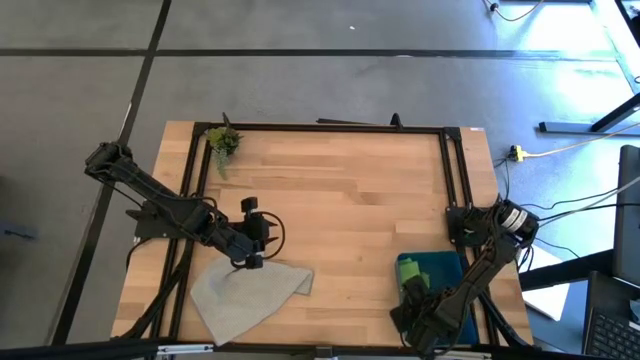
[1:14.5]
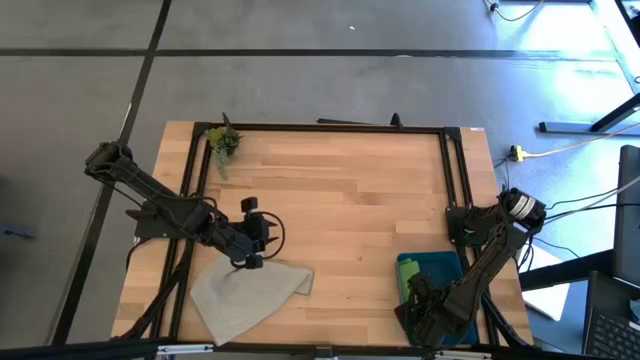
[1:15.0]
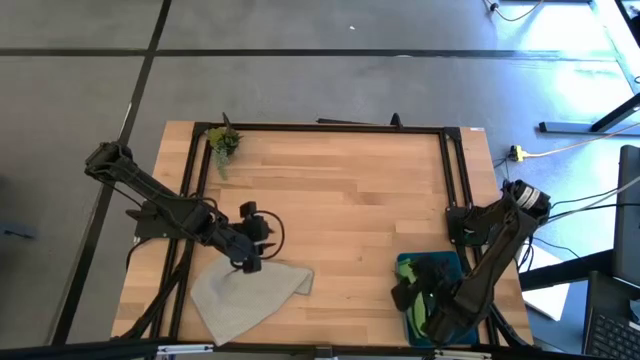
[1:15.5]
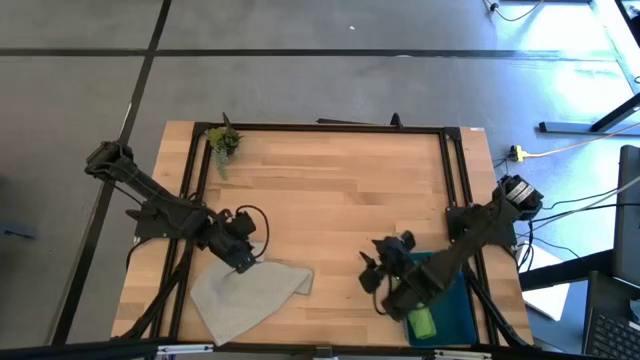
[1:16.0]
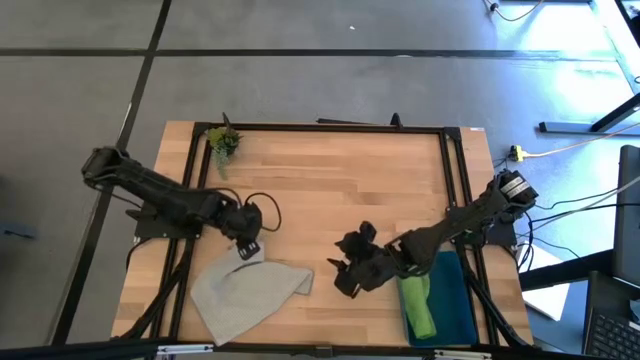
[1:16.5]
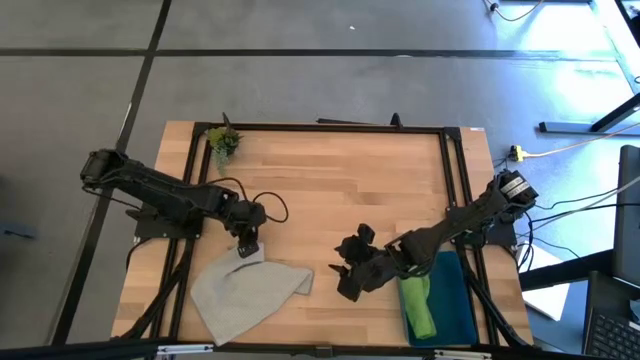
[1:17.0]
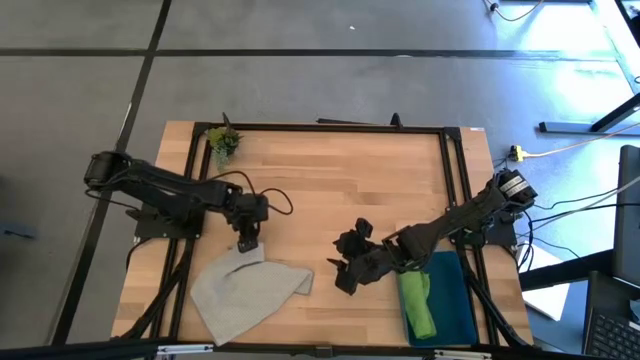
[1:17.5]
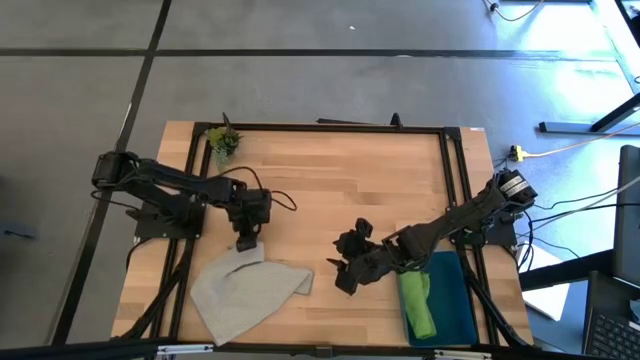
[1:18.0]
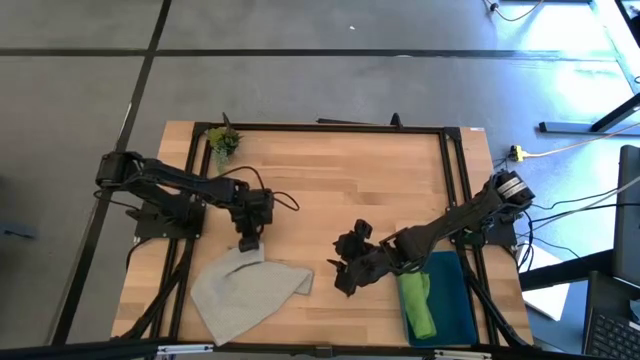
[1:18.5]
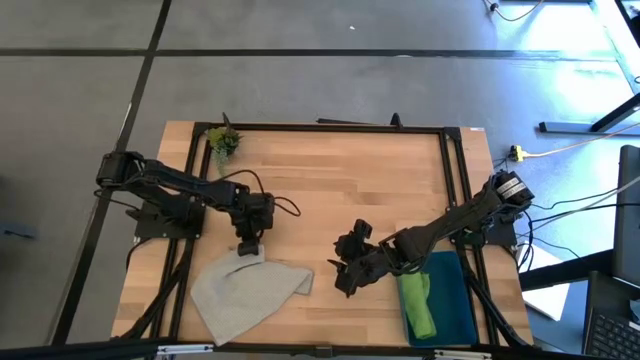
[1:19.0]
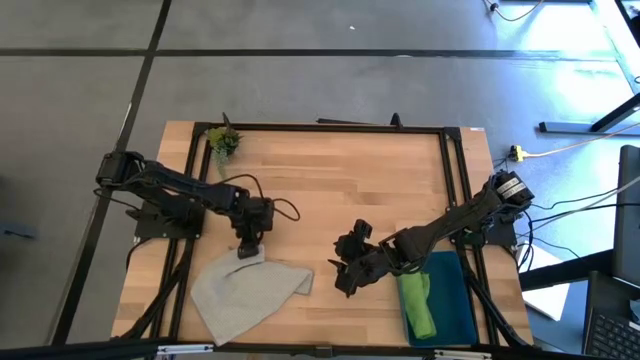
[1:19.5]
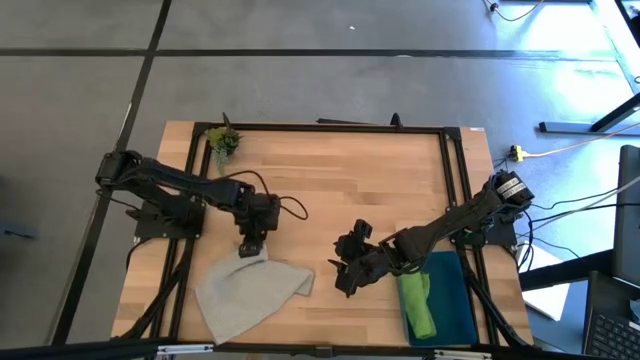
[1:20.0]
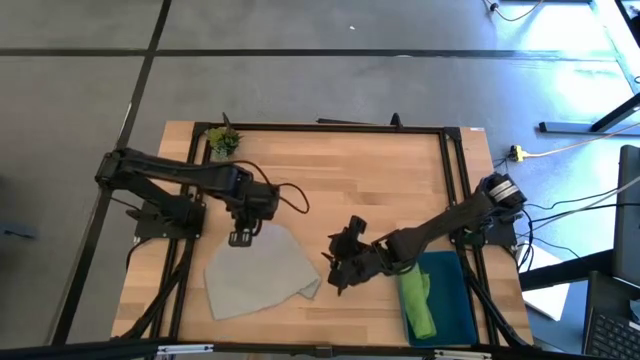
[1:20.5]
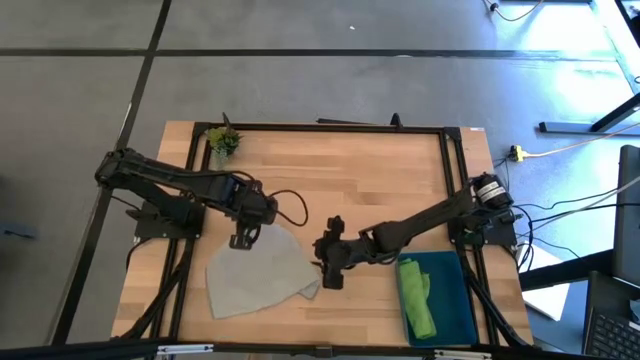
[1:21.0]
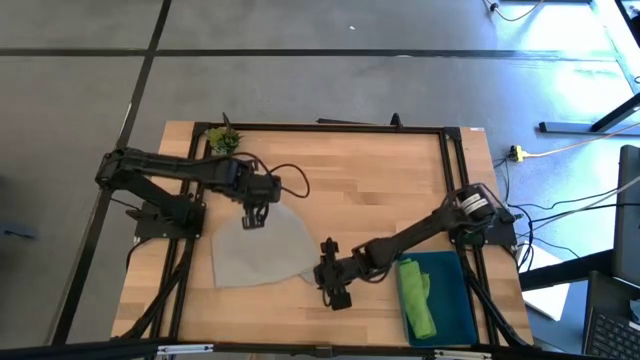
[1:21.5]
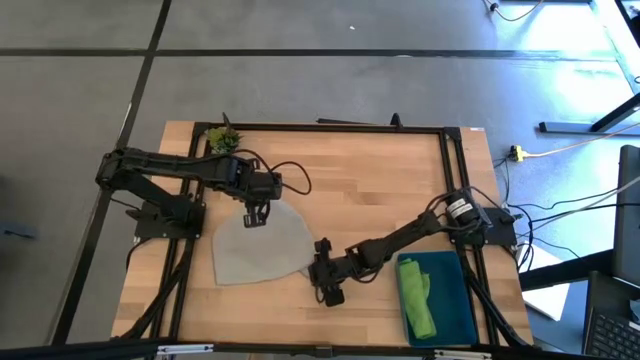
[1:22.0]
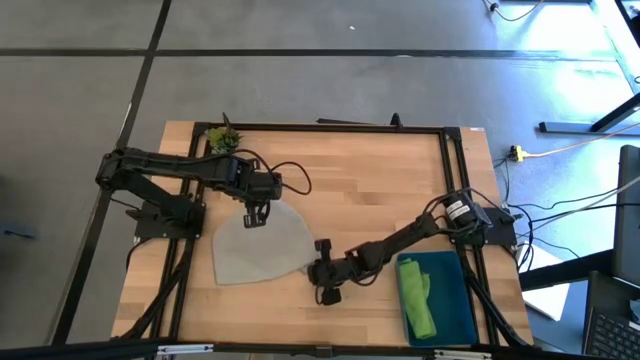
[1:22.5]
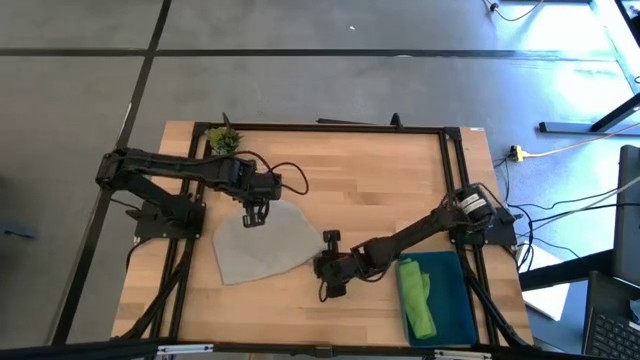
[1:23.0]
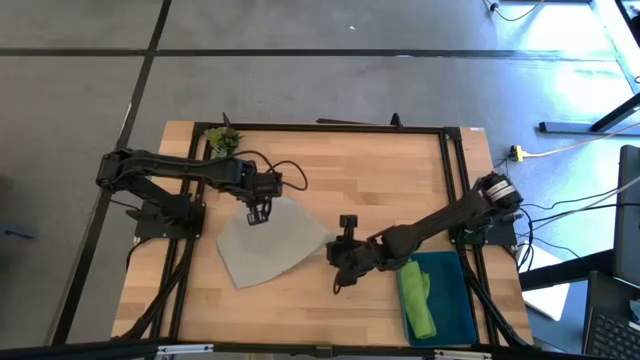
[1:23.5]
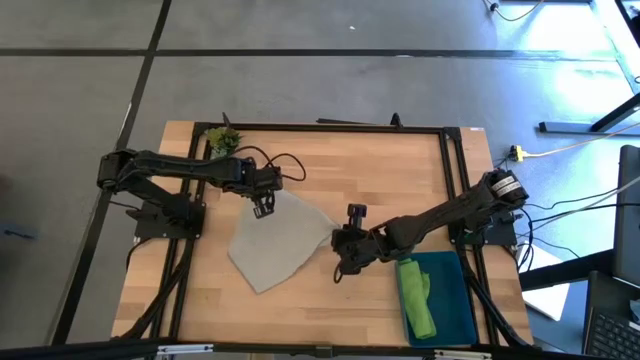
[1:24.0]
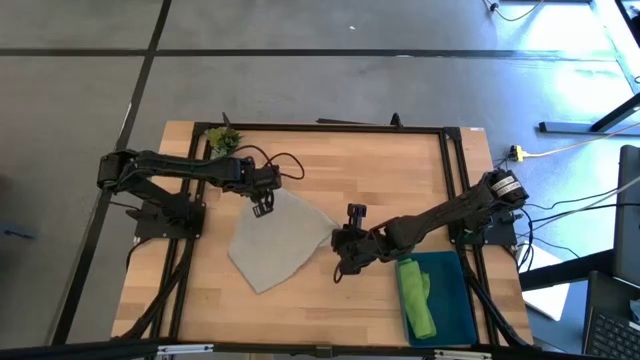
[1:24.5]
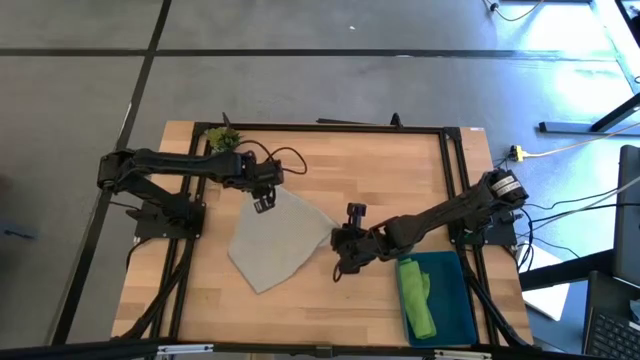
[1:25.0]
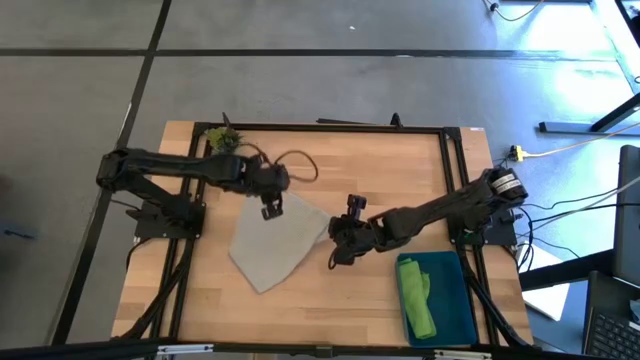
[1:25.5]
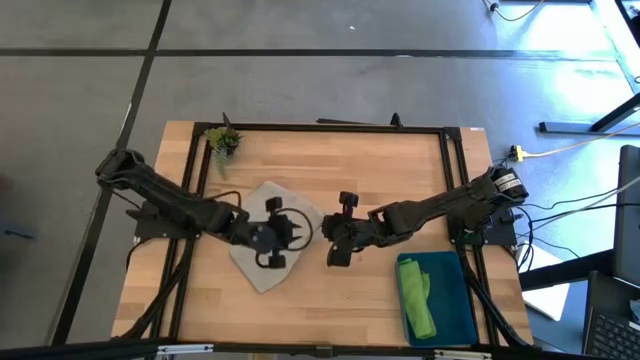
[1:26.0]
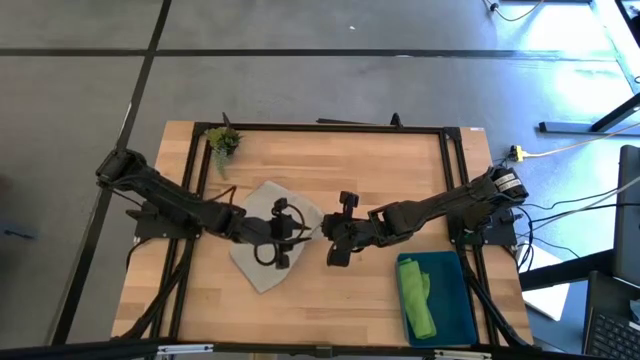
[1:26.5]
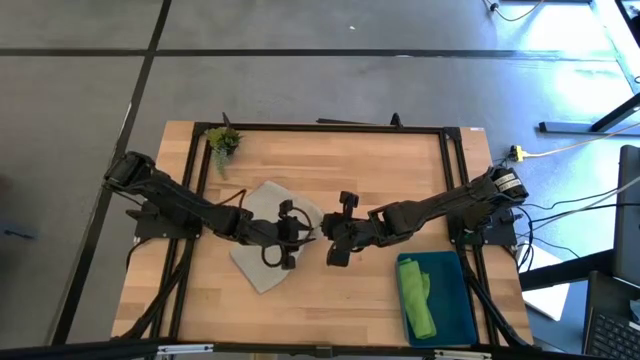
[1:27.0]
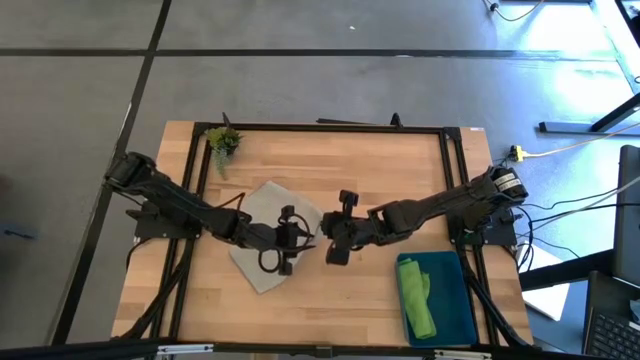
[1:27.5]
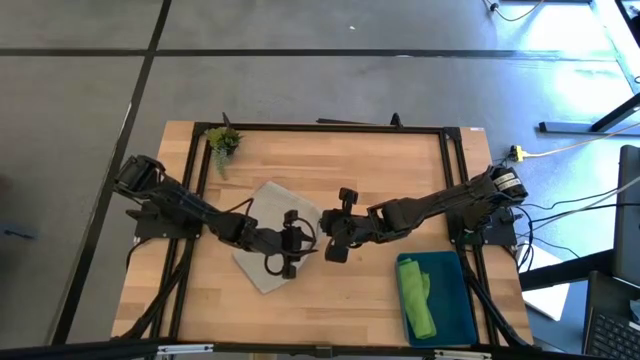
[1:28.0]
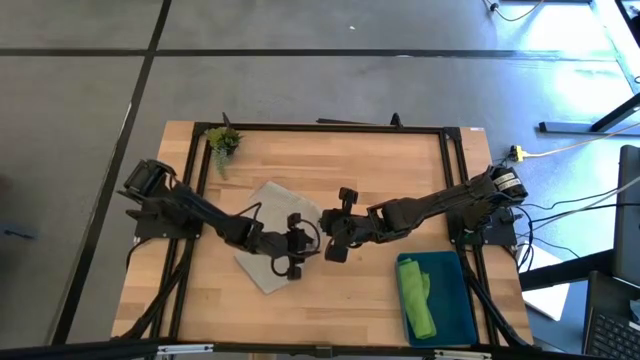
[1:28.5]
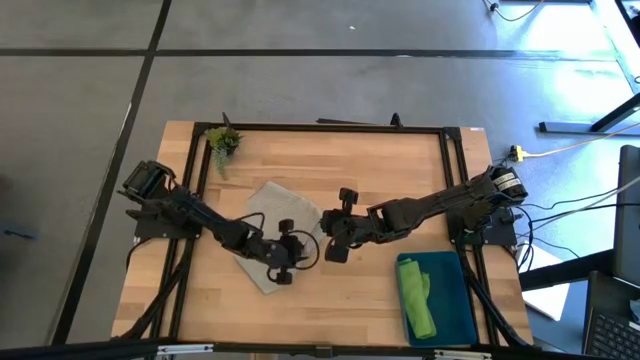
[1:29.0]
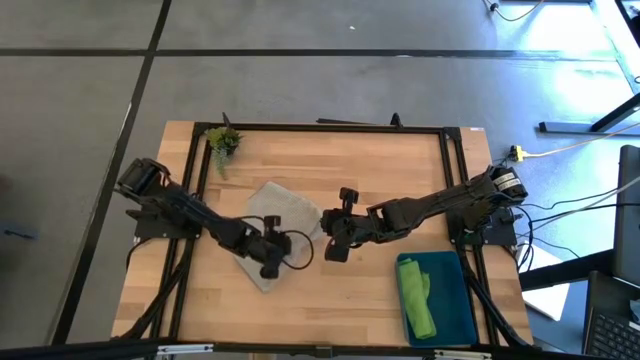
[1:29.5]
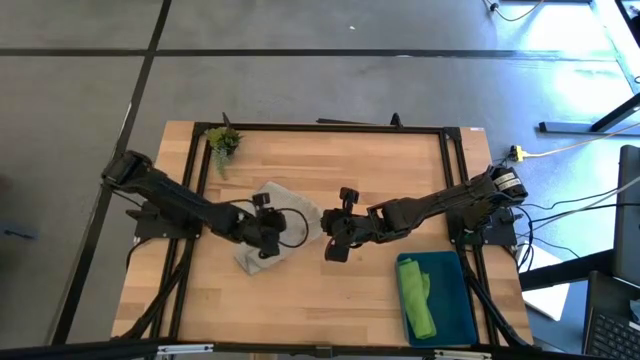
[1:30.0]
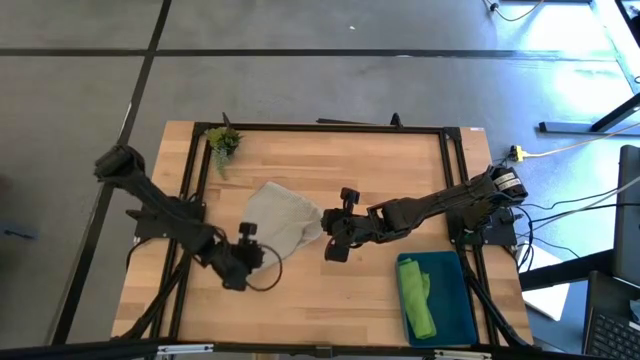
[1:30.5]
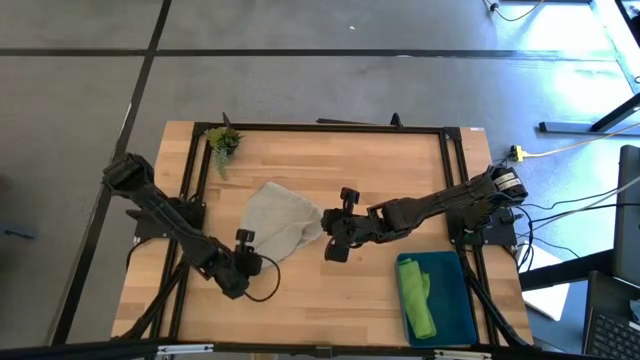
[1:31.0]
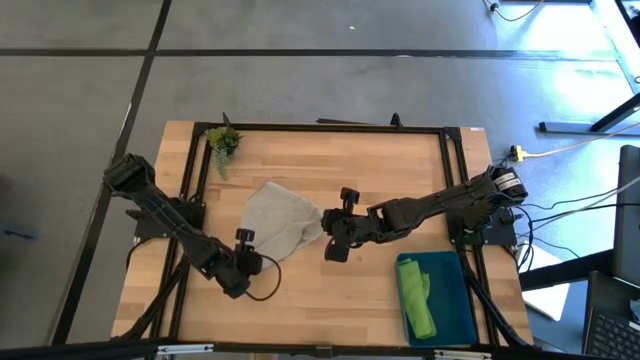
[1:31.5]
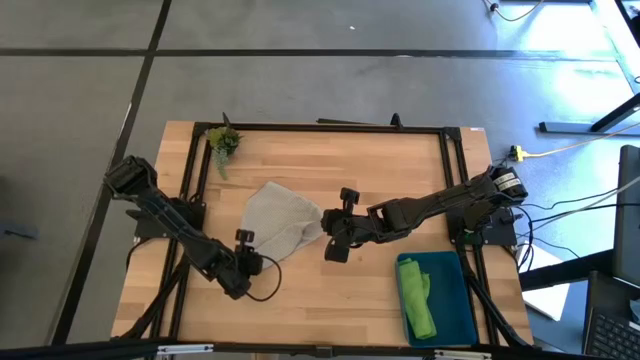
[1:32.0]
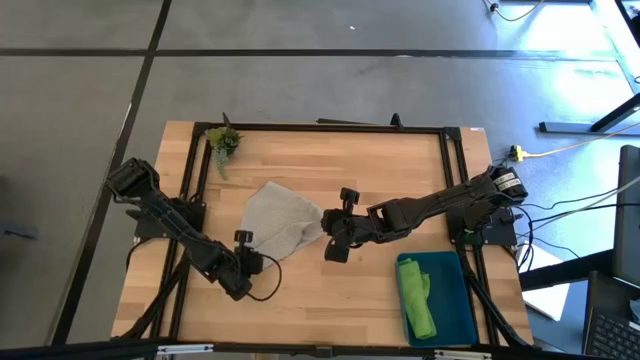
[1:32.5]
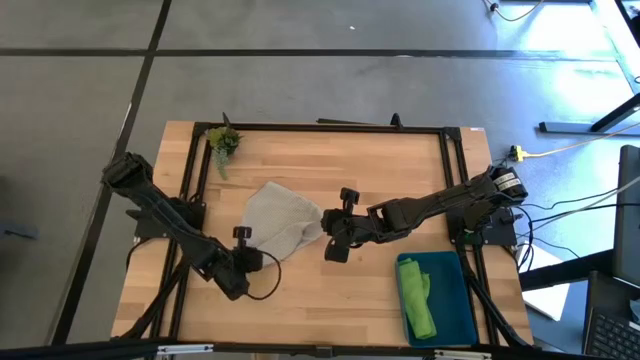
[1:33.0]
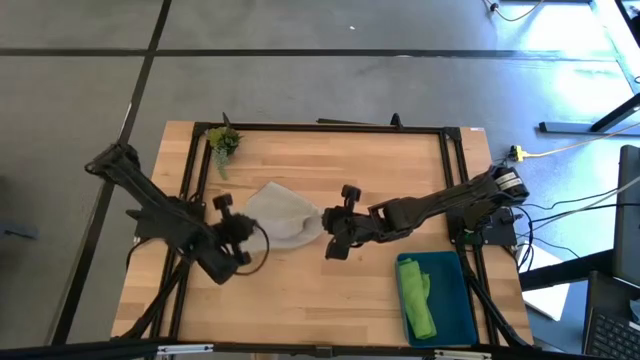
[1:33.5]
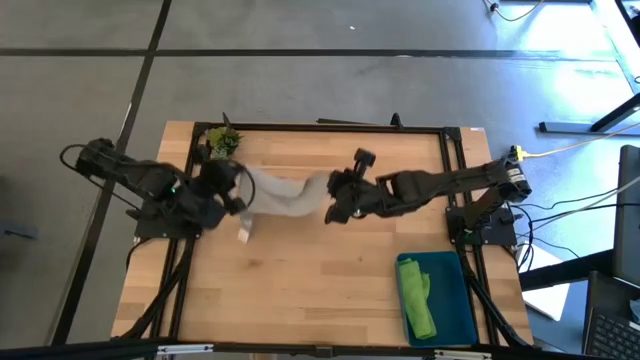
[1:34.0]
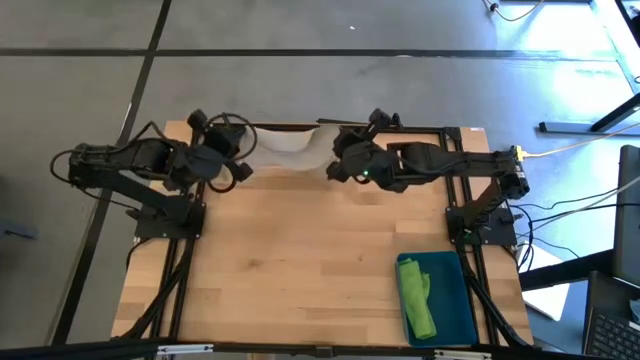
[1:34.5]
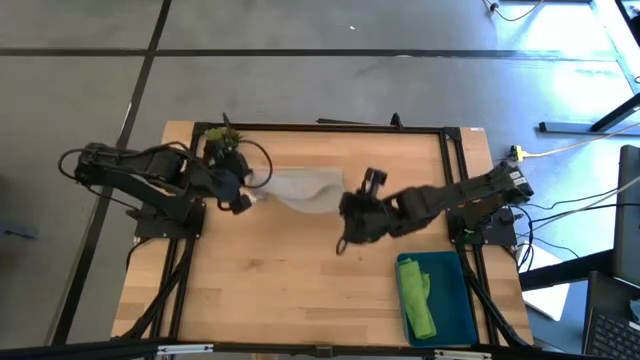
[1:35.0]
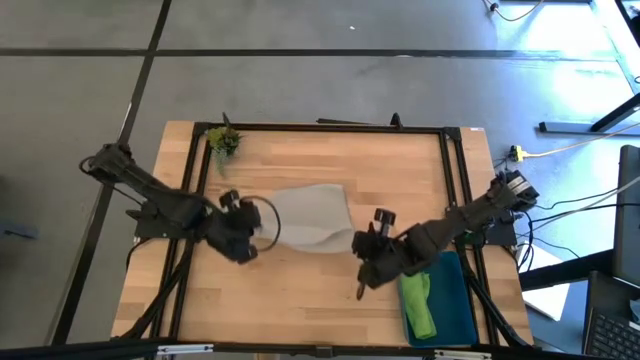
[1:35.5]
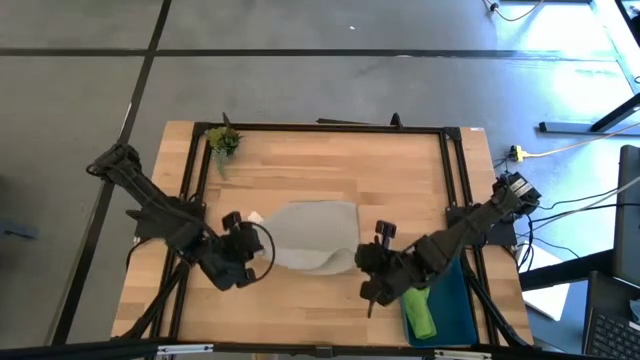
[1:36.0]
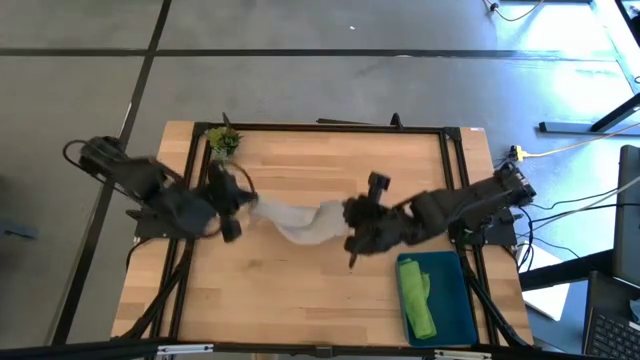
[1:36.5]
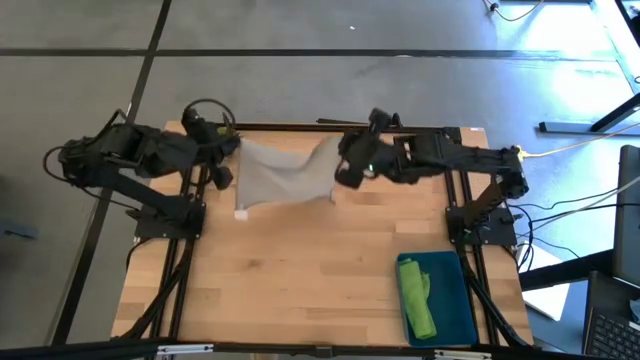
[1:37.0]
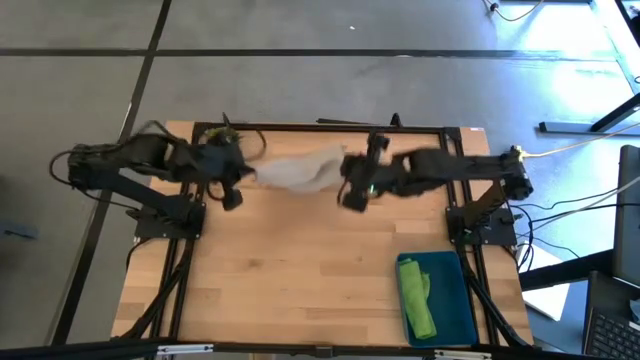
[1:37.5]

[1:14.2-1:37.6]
Task: Roll microfiber towels into tight, uniform cylinder then place into a basket
Roll the gray microfiber cloth
